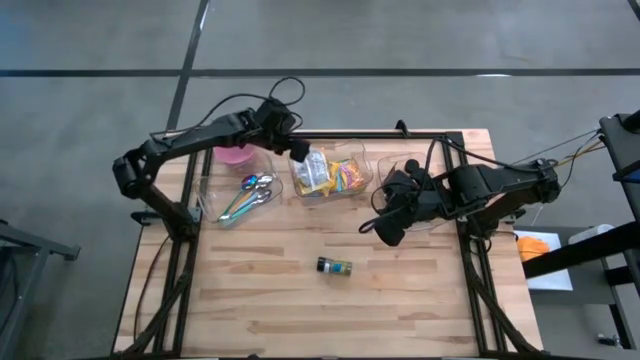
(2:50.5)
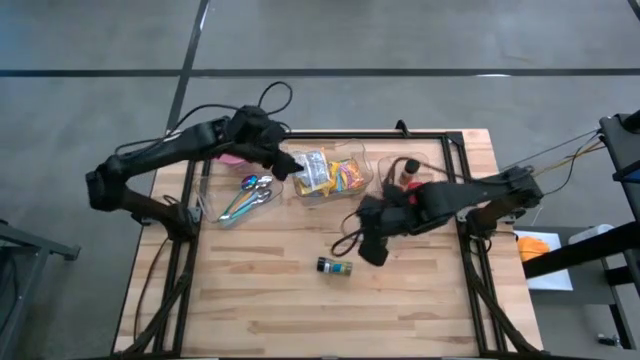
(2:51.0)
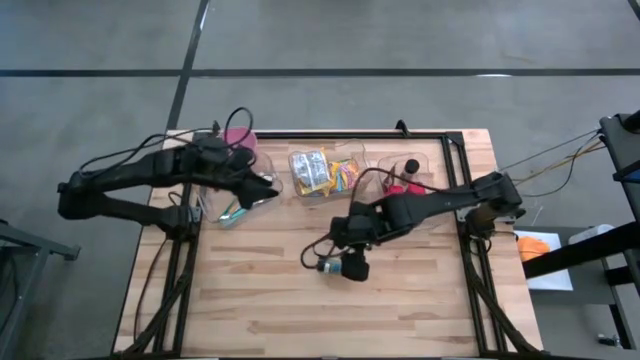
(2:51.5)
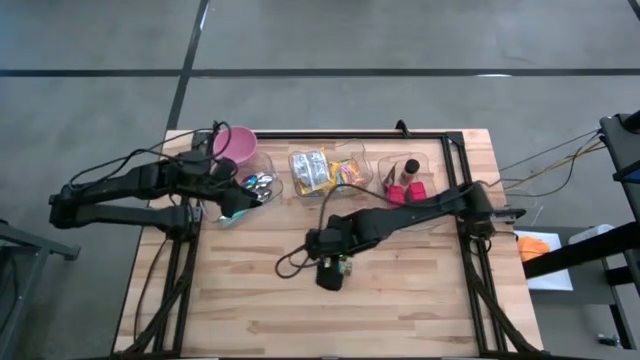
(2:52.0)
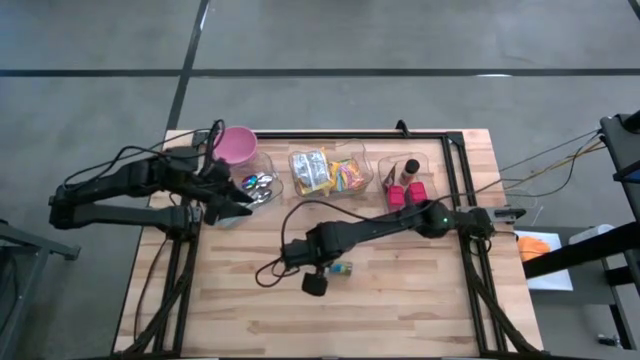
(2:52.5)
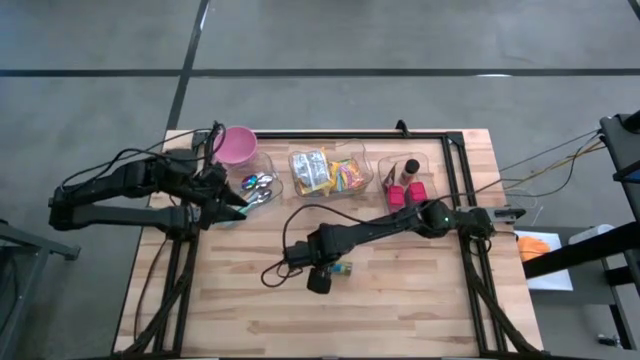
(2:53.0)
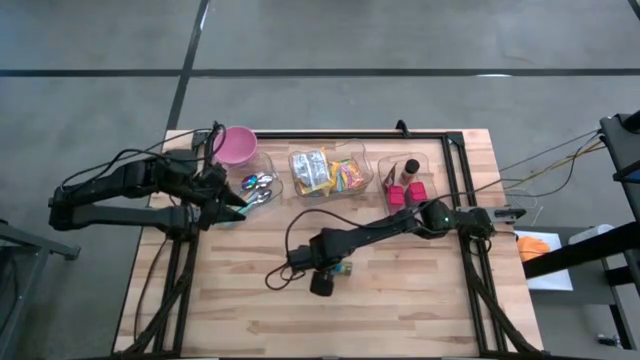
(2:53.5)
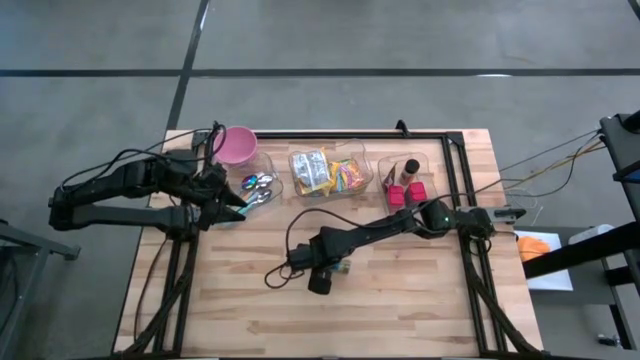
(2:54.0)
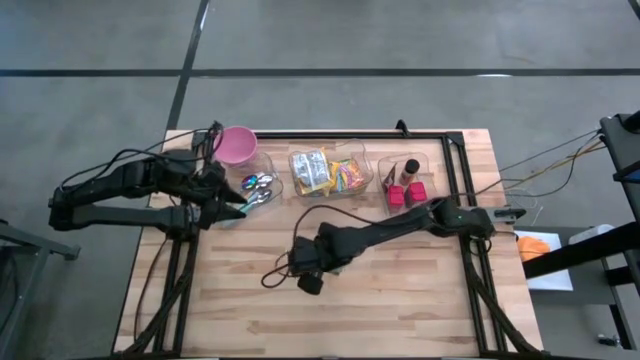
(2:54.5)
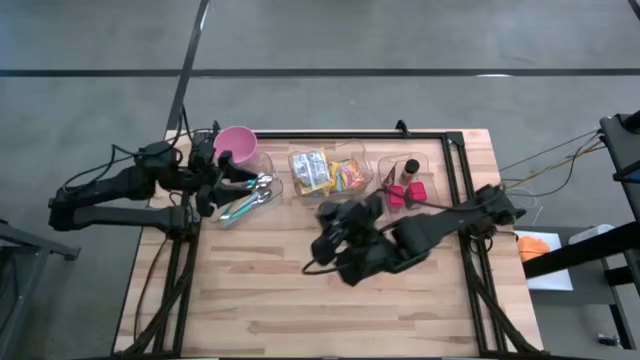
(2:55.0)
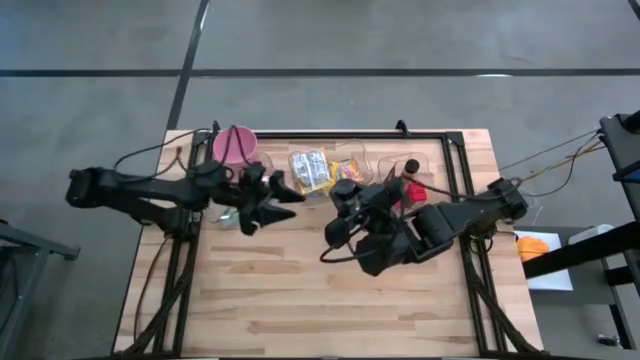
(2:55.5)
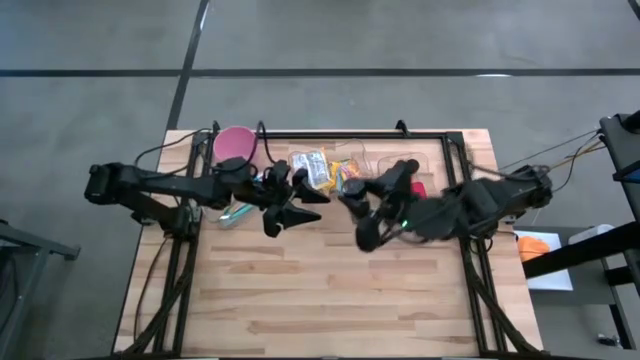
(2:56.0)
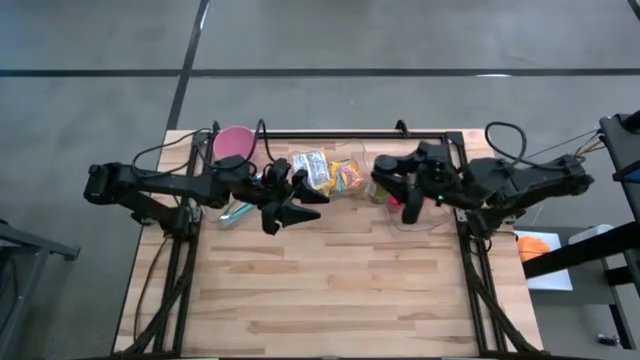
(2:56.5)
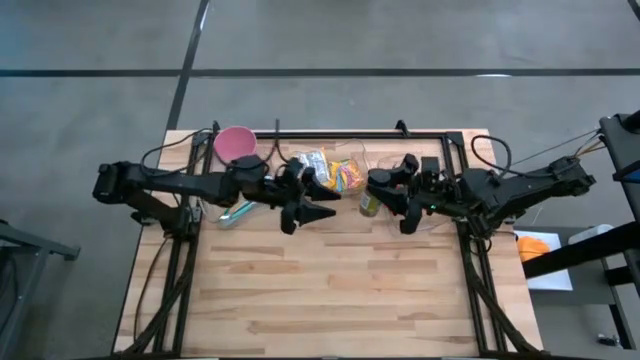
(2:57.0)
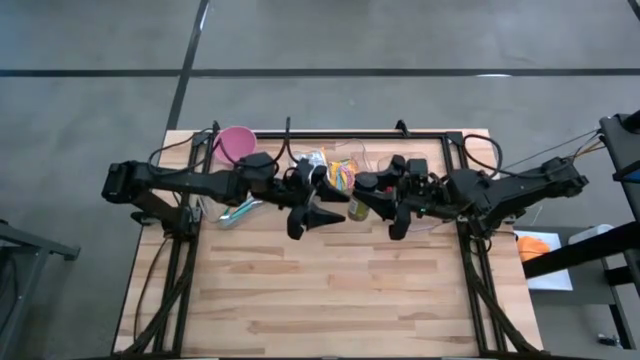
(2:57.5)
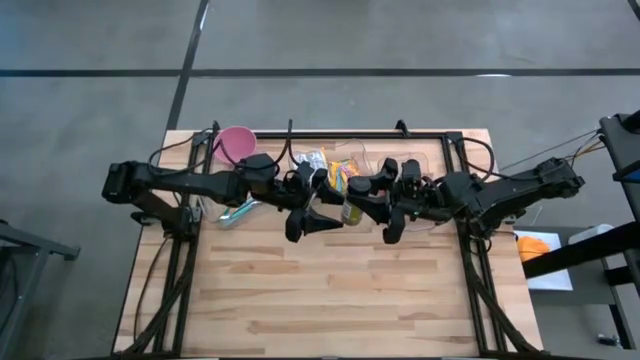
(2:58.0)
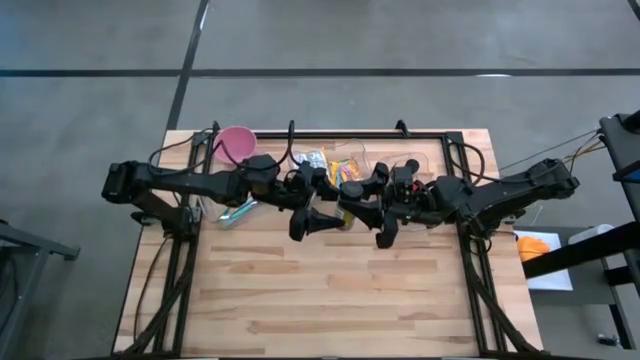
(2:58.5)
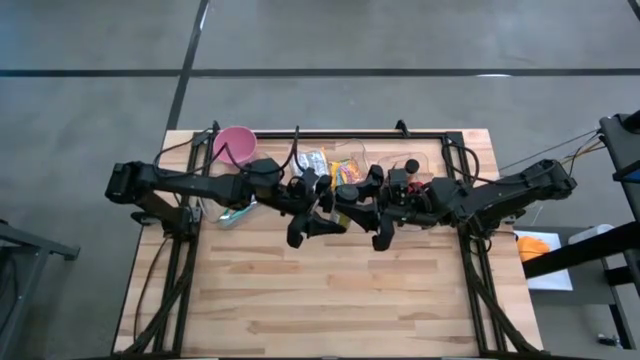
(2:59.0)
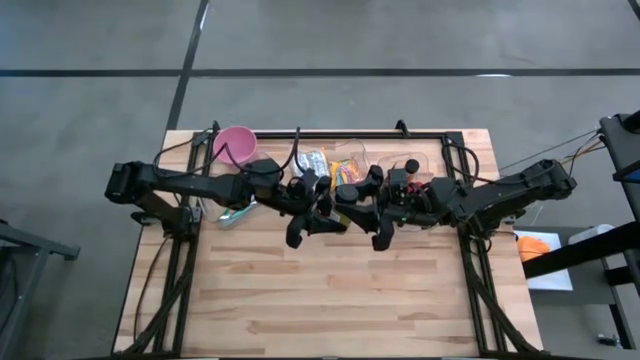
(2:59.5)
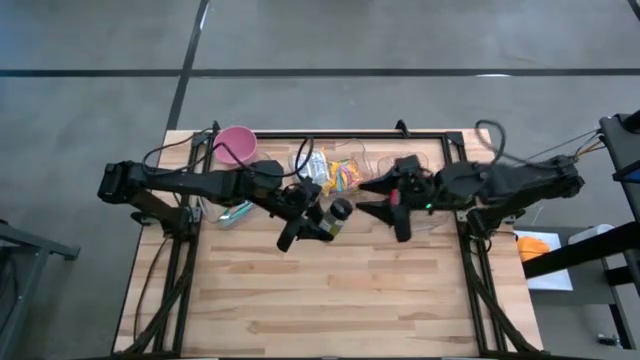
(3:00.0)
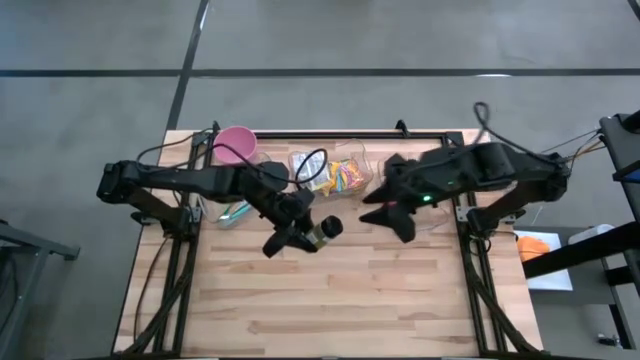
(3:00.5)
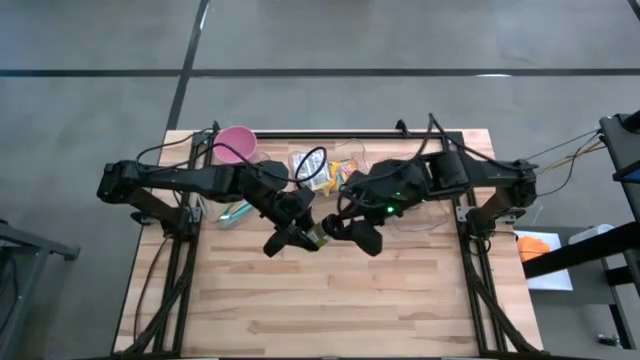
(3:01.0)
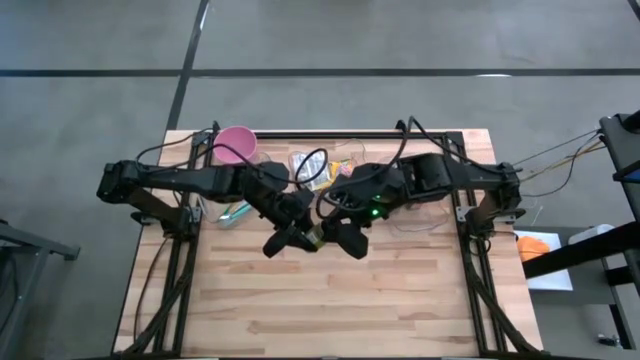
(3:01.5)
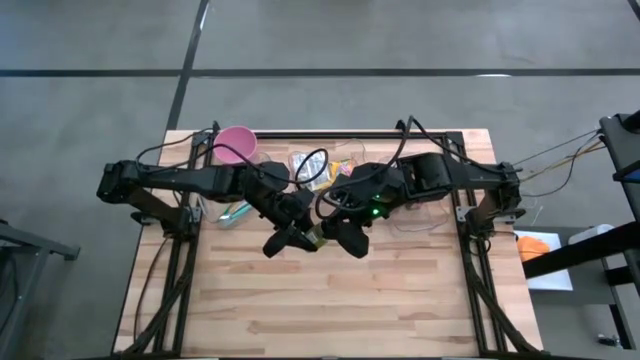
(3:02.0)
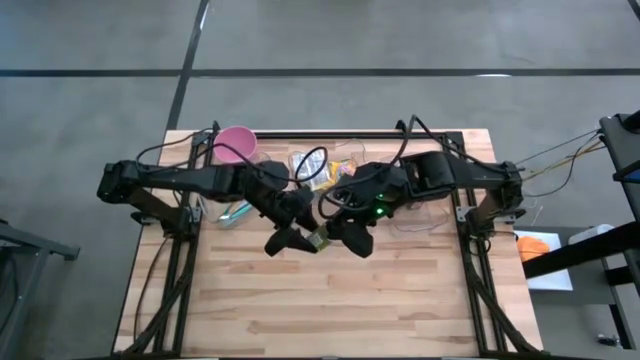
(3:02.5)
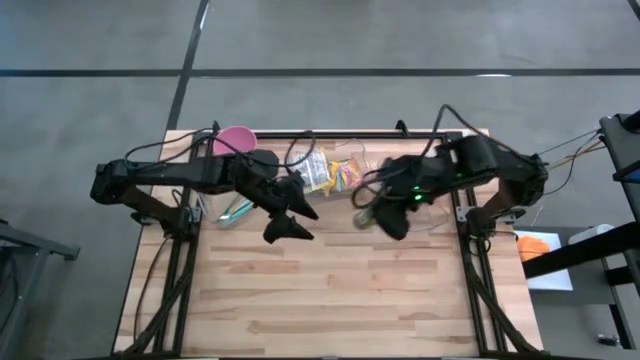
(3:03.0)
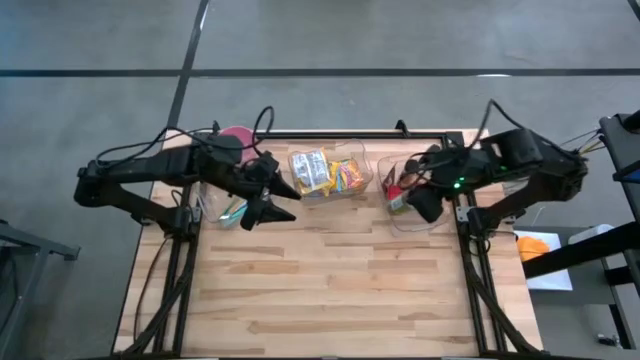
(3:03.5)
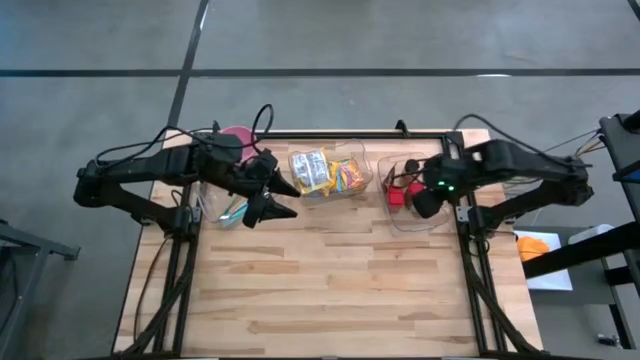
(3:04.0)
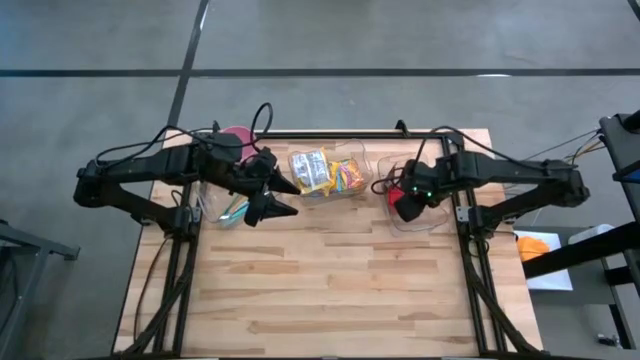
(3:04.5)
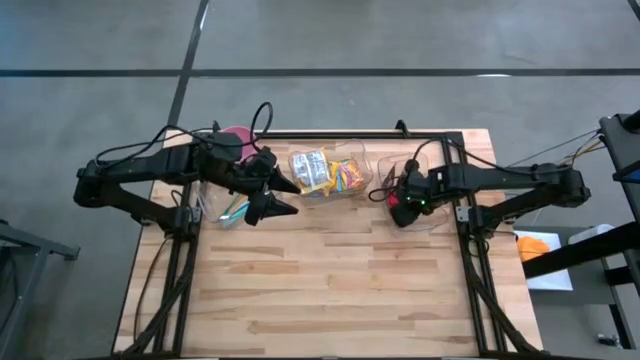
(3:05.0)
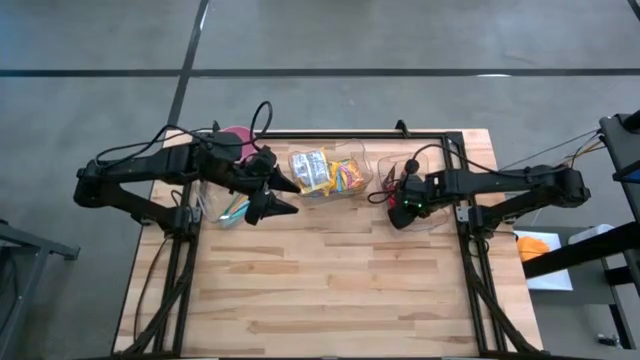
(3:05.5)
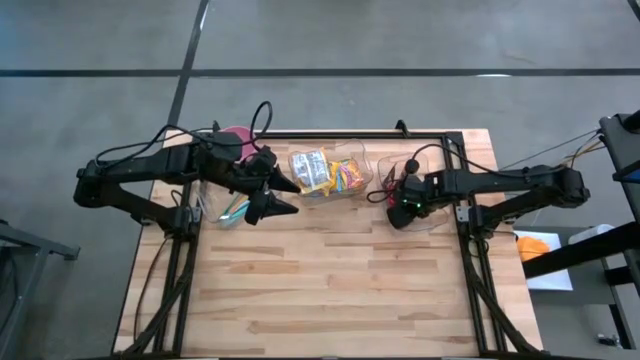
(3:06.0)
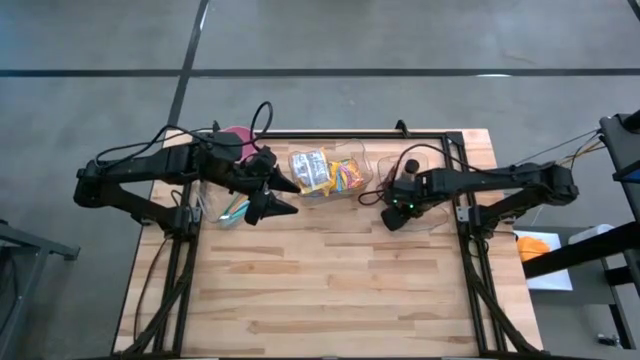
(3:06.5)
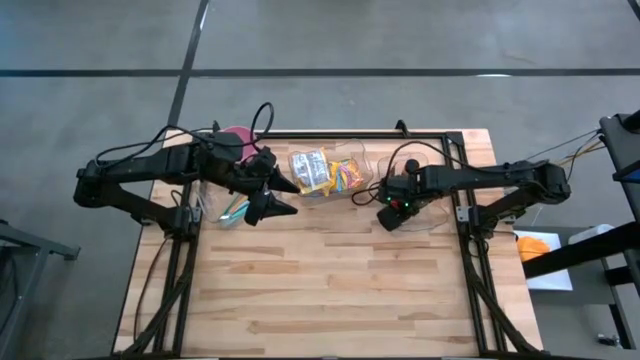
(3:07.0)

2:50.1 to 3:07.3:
Put the black seasoning bottle into the right transparent bin
